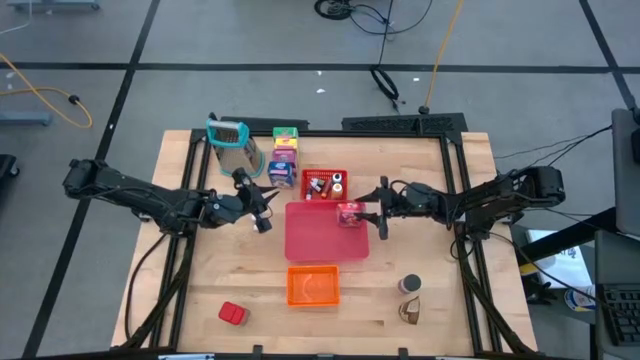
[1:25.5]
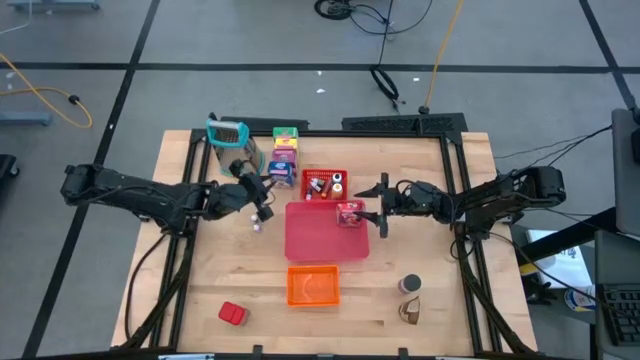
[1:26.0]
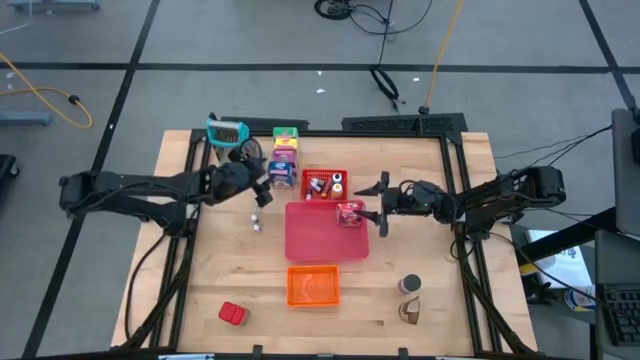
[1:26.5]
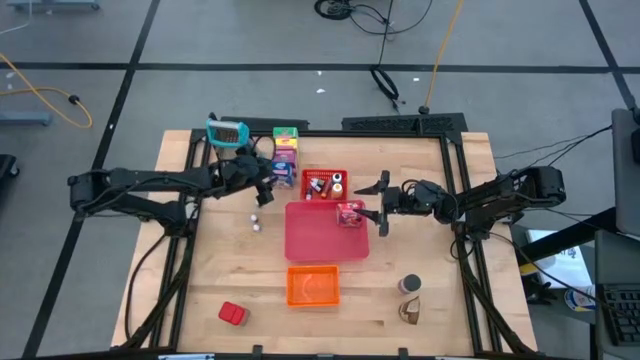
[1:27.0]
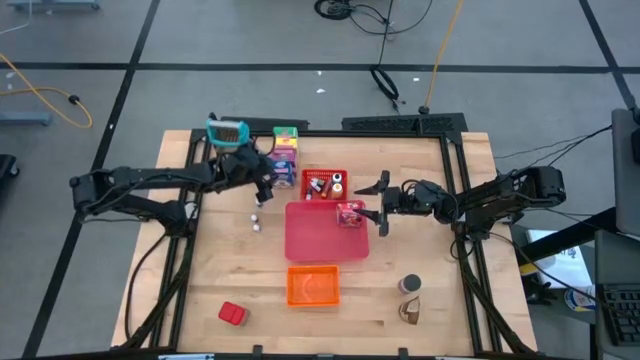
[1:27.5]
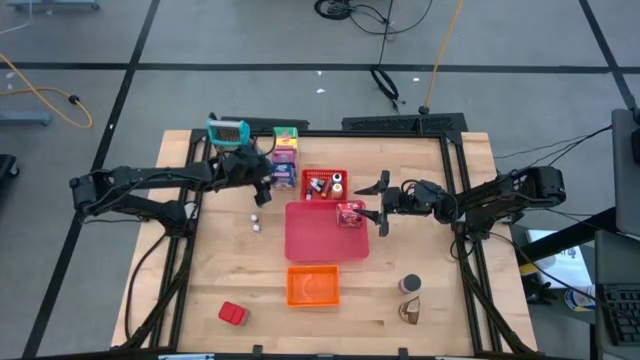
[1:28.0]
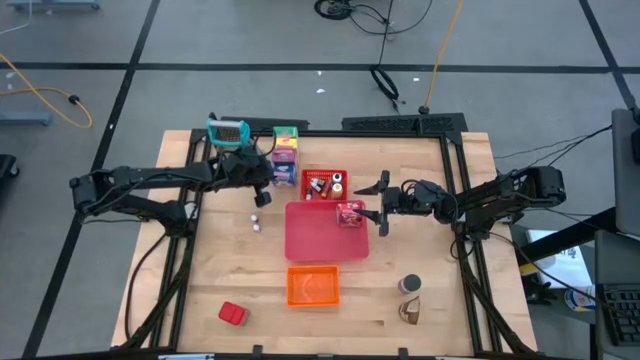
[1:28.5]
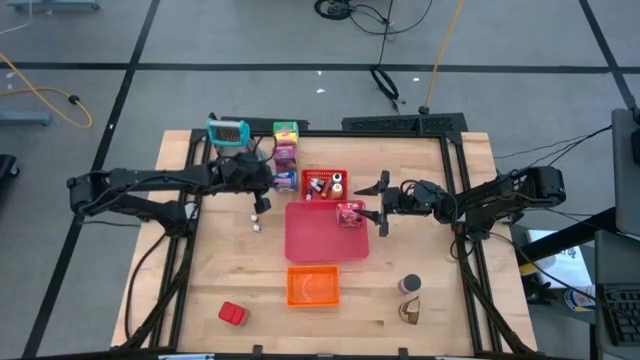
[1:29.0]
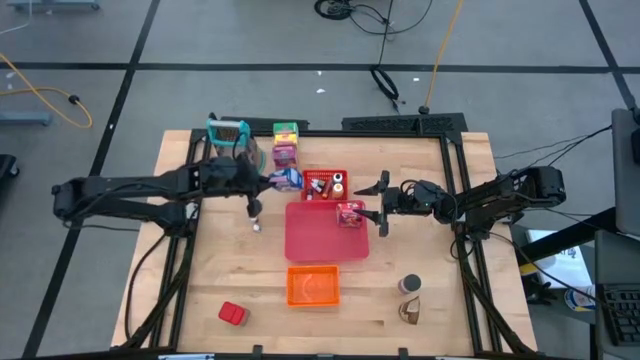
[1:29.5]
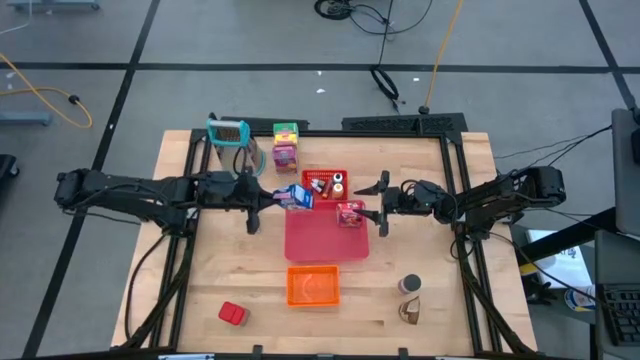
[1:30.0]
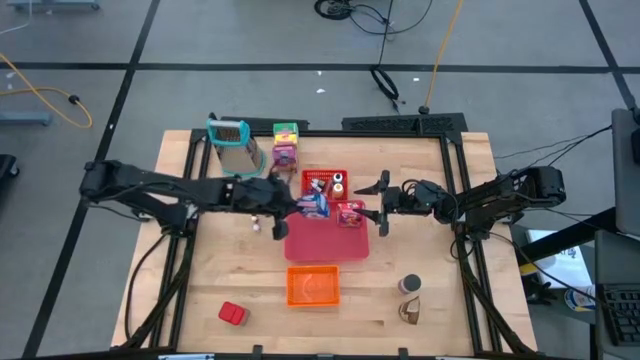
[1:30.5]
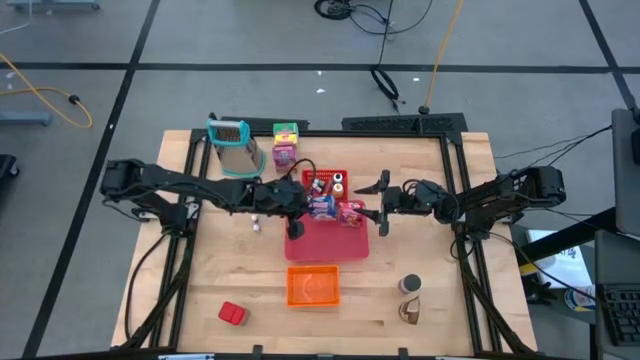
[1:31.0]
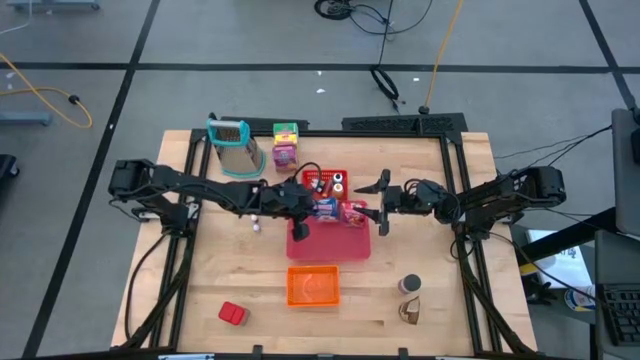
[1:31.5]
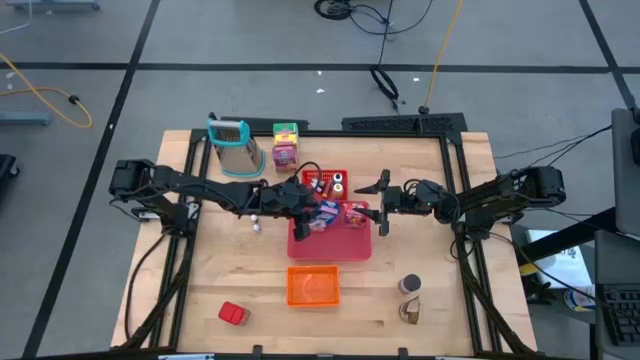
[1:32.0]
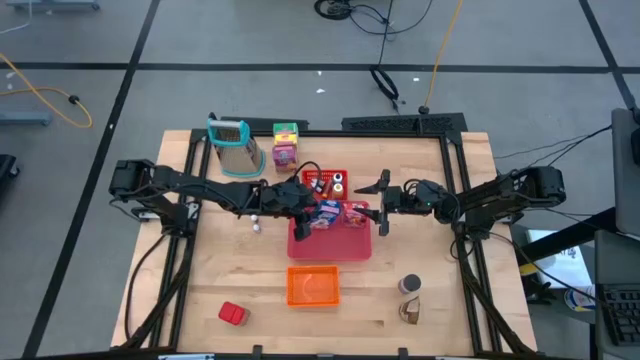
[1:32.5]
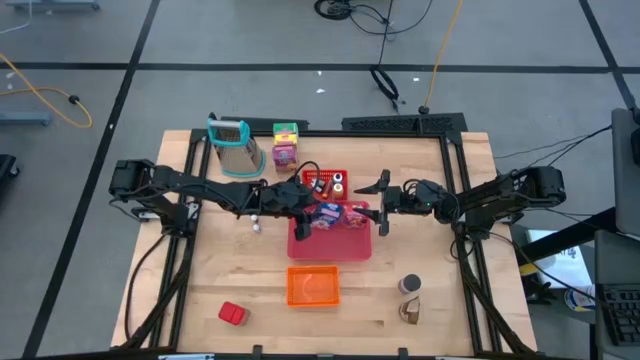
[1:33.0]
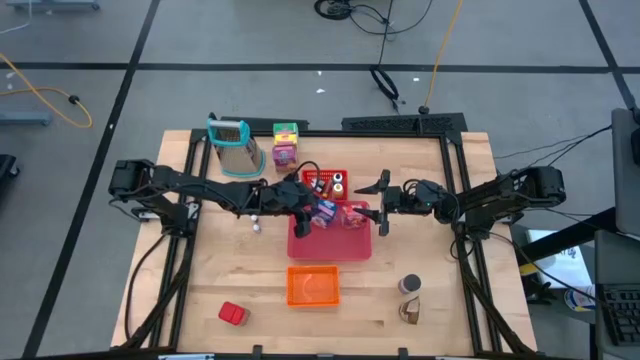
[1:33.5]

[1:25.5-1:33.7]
Task: Pick & Place Kitchen Items
Put the blue cereal box into the pink bin

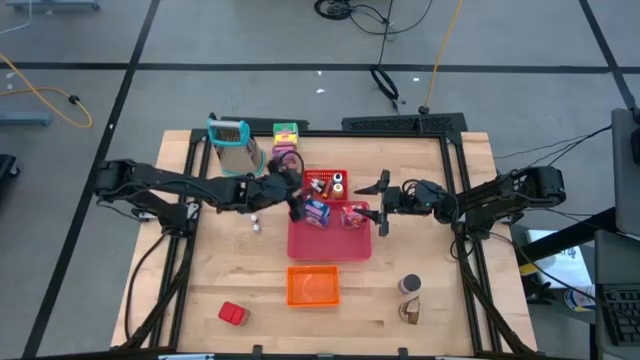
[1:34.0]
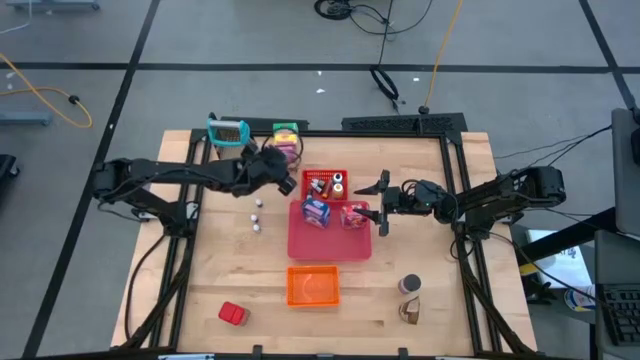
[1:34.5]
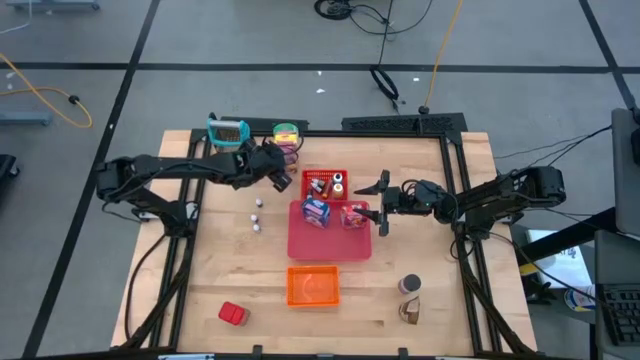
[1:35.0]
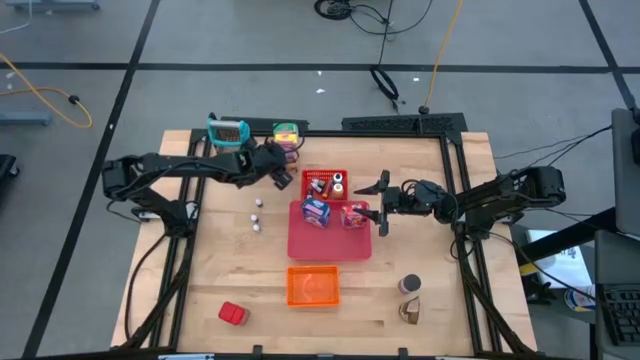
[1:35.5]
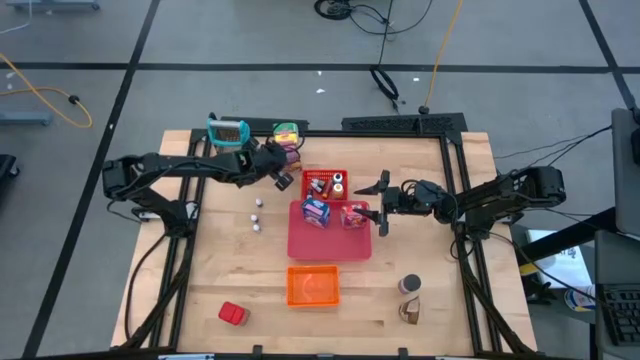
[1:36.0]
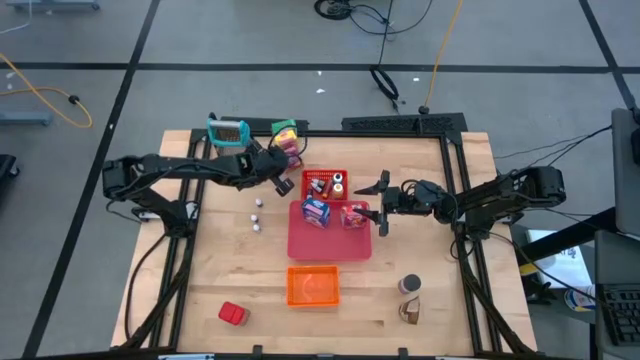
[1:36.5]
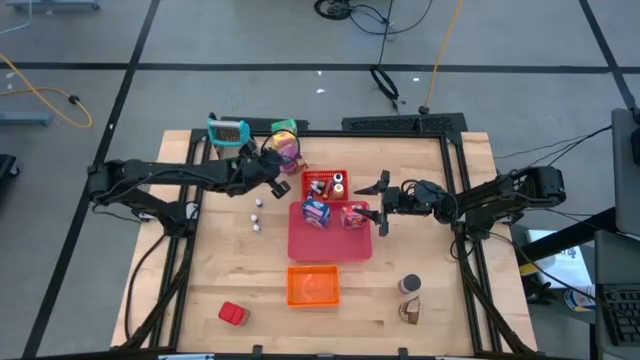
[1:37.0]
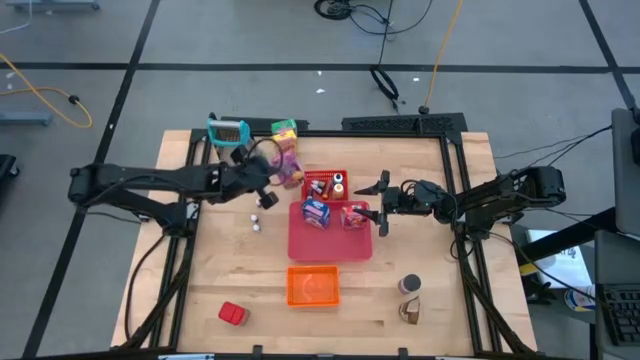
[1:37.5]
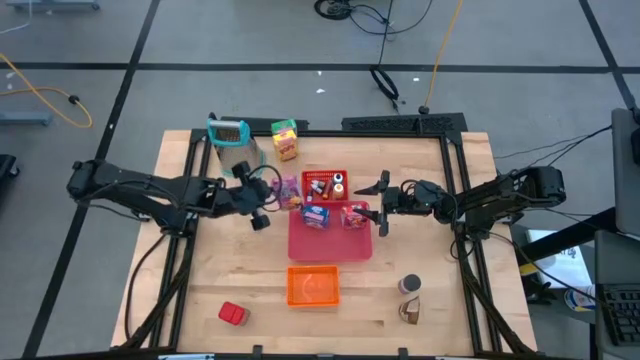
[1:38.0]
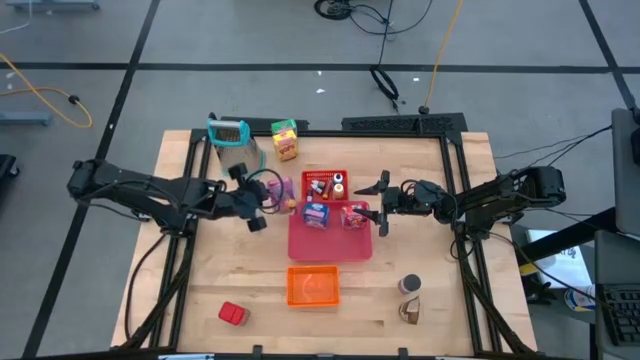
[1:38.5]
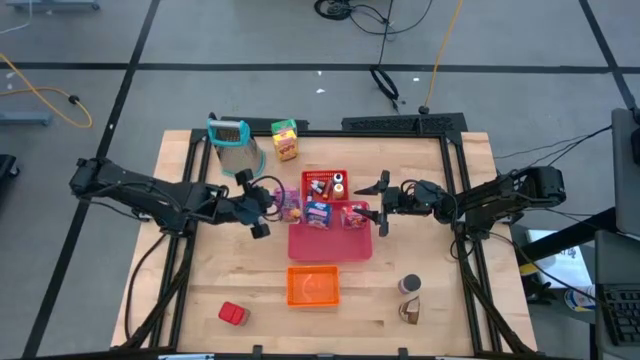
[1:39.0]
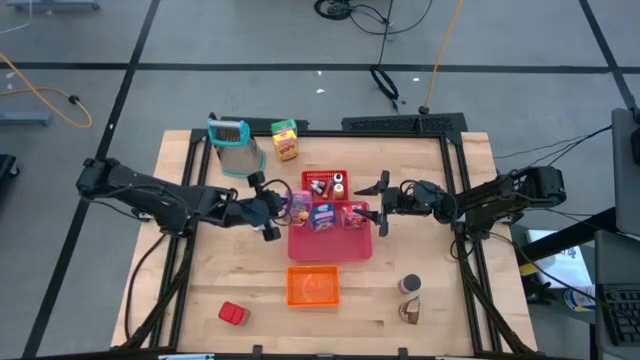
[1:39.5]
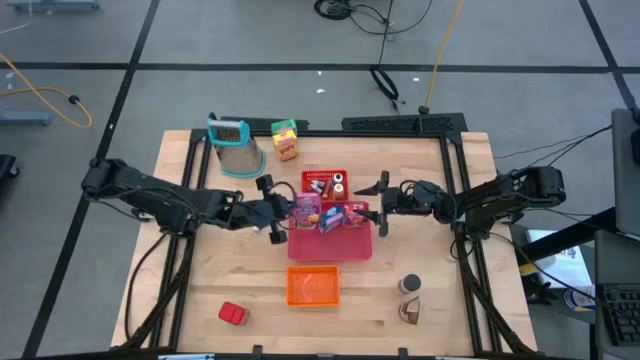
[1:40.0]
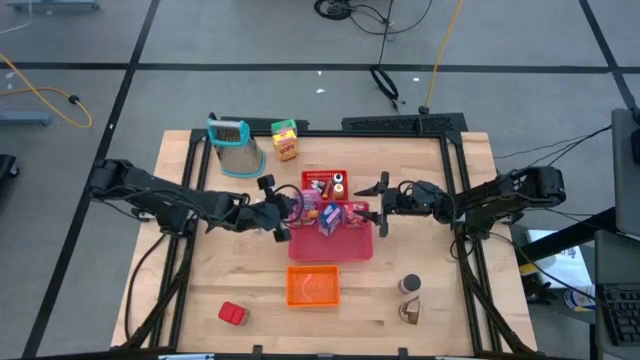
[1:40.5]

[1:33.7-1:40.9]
Put the violet cereal box into the pink bin

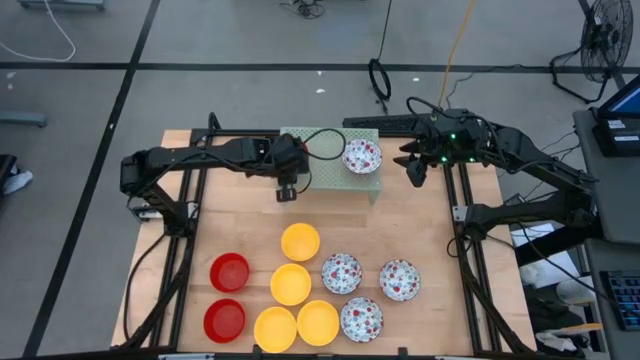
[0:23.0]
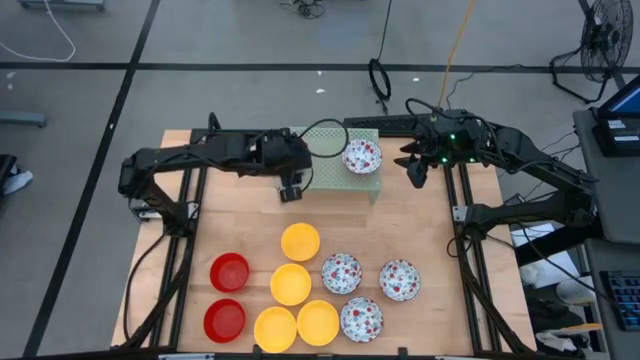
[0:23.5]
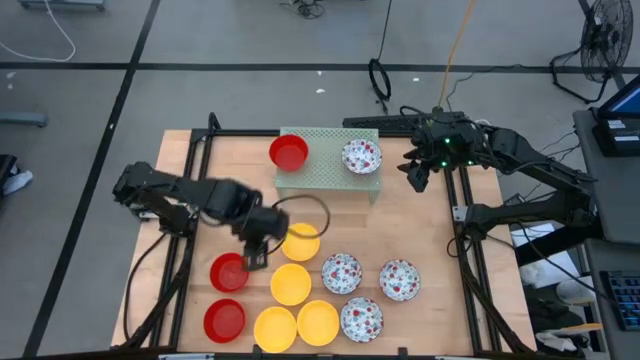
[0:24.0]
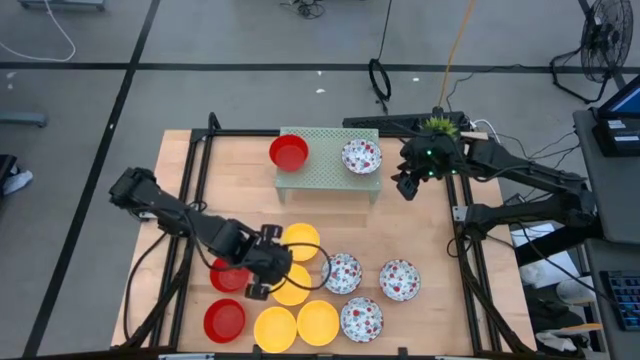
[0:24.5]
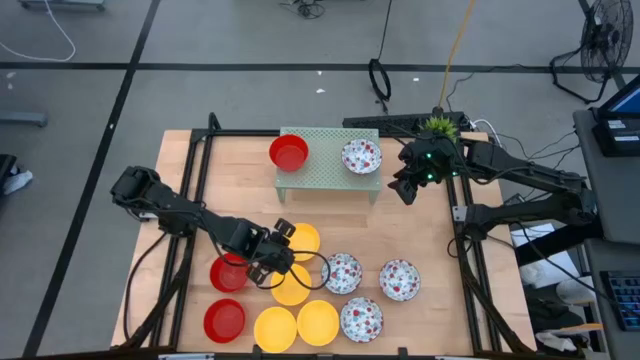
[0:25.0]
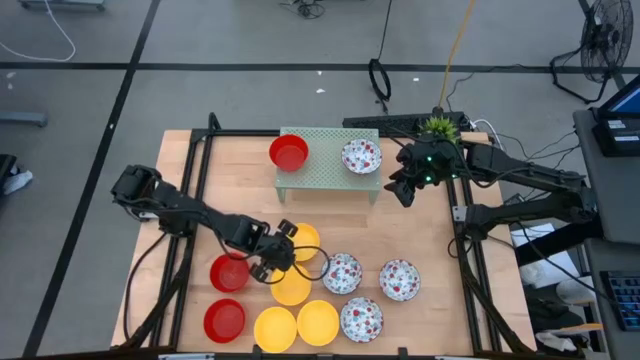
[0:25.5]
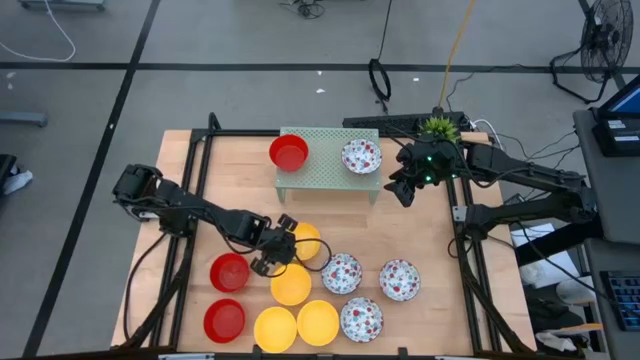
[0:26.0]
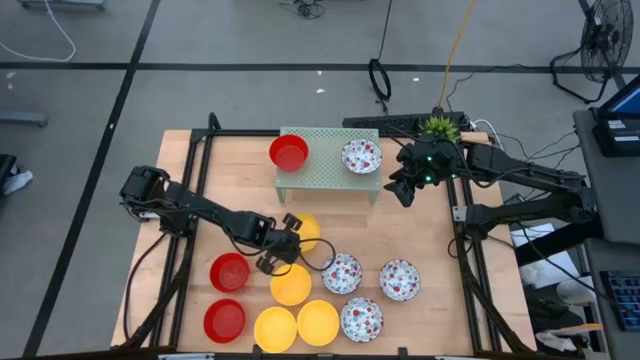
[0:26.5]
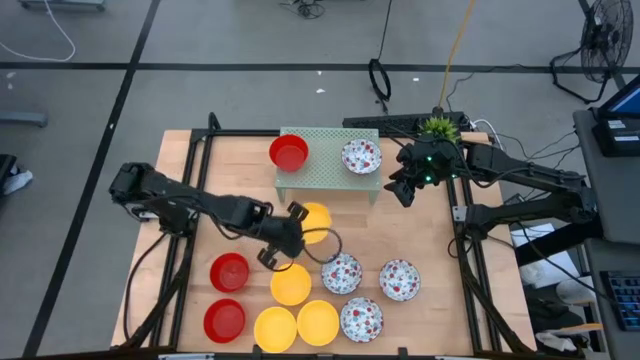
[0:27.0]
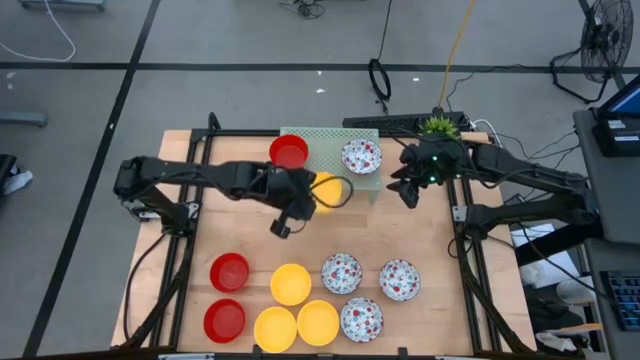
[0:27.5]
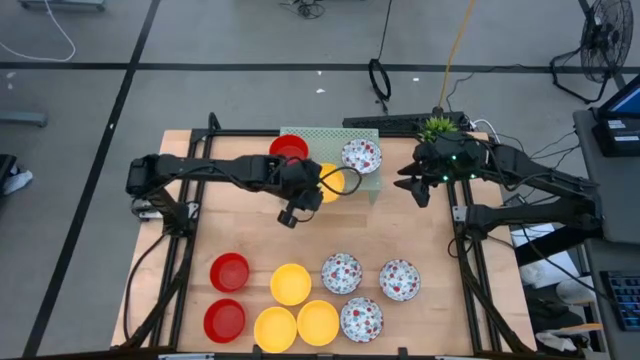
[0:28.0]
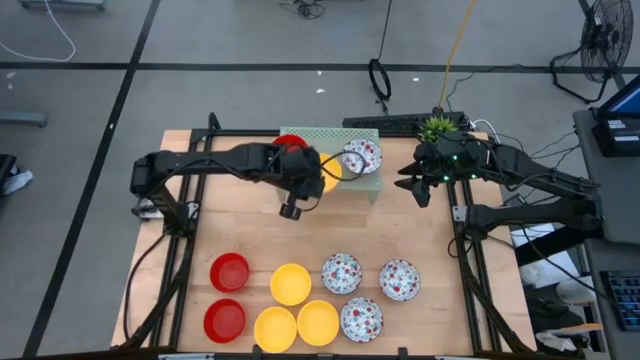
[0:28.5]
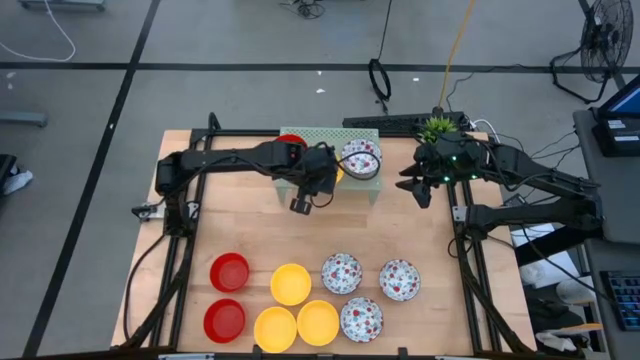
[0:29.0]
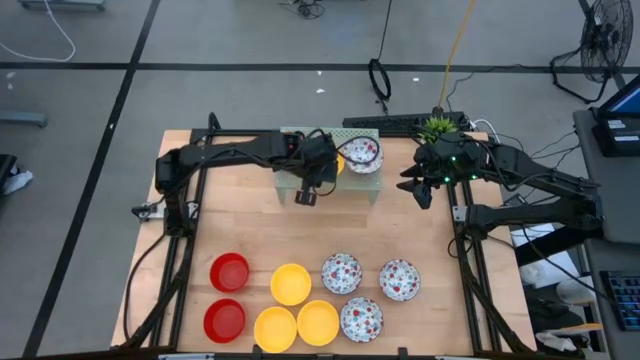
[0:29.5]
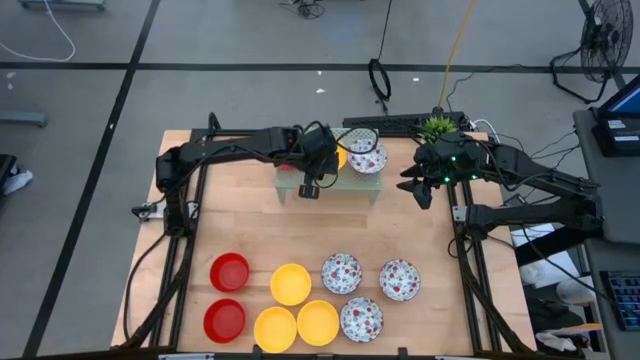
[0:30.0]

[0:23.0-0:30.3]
Task: Pick & Place Mini bowls
Put the yellow bowl on the shelf
